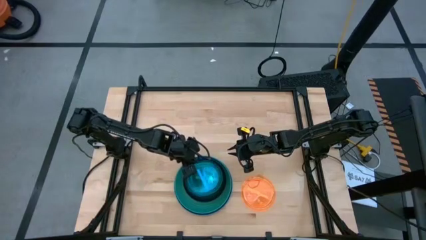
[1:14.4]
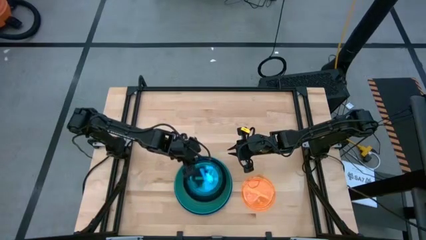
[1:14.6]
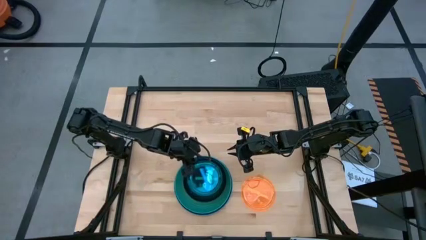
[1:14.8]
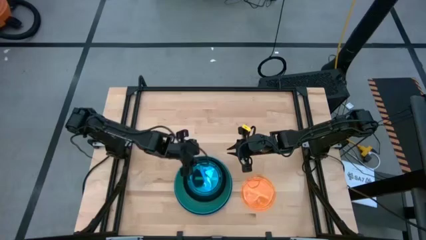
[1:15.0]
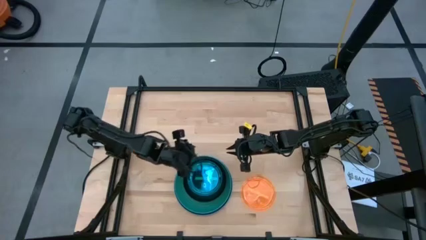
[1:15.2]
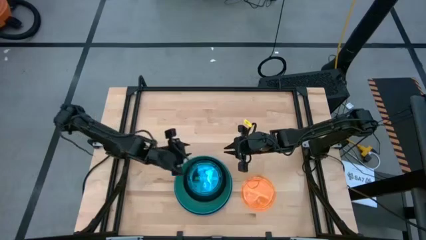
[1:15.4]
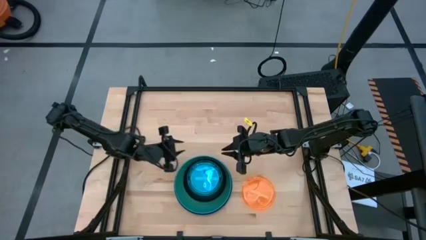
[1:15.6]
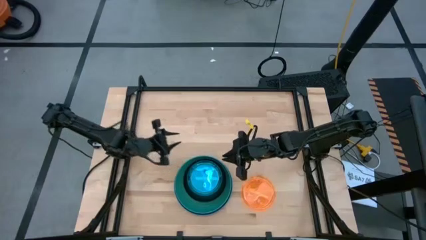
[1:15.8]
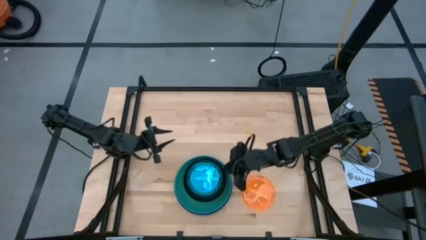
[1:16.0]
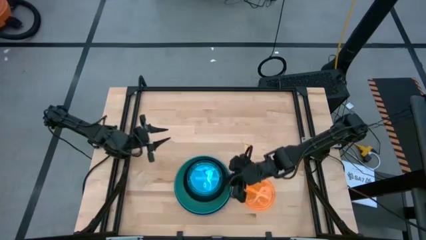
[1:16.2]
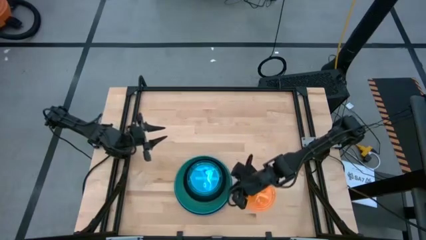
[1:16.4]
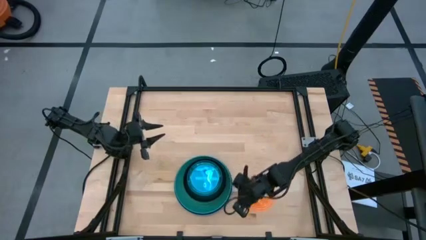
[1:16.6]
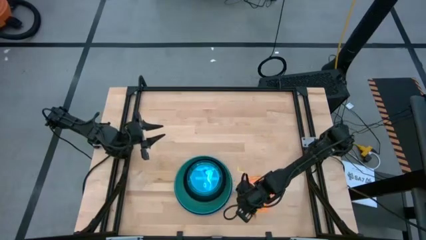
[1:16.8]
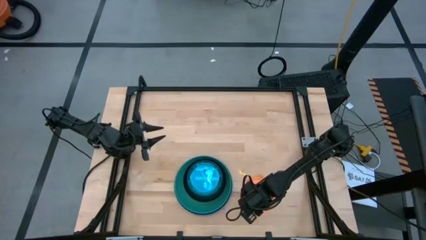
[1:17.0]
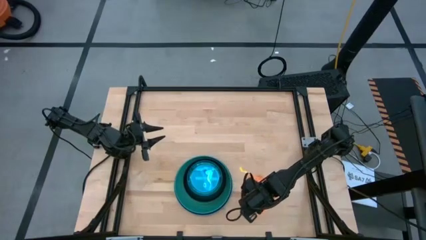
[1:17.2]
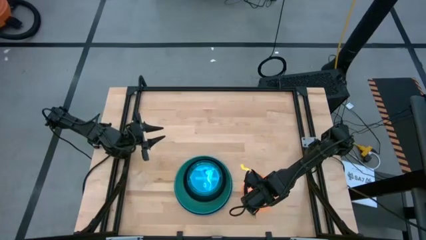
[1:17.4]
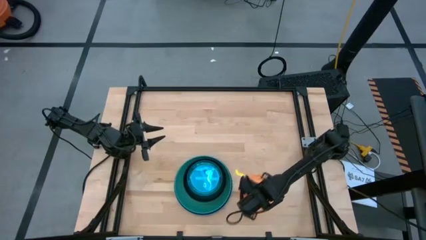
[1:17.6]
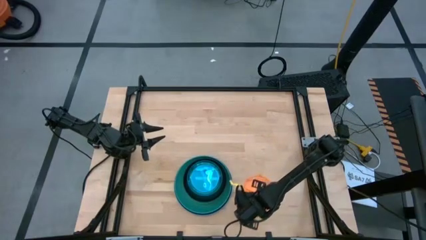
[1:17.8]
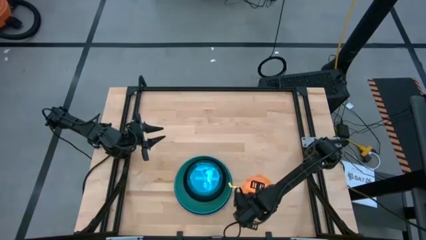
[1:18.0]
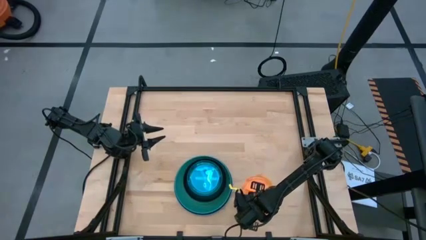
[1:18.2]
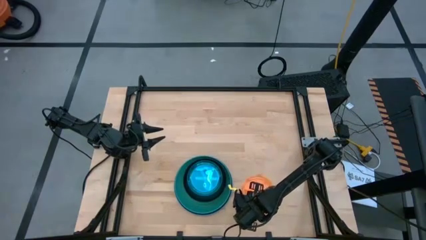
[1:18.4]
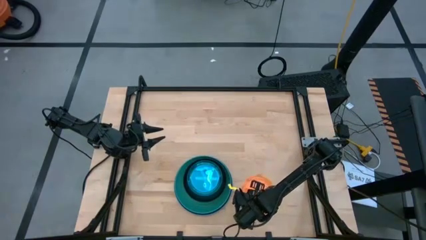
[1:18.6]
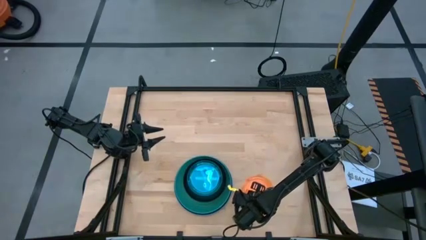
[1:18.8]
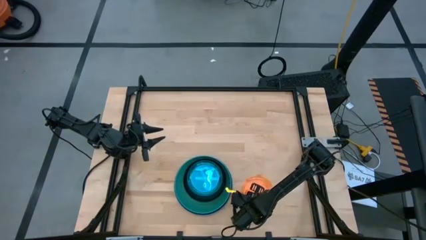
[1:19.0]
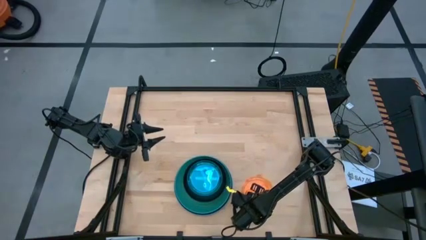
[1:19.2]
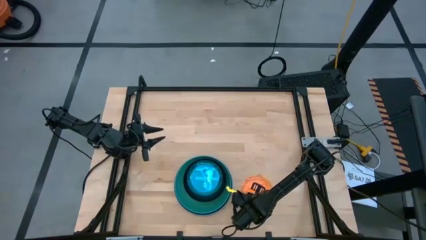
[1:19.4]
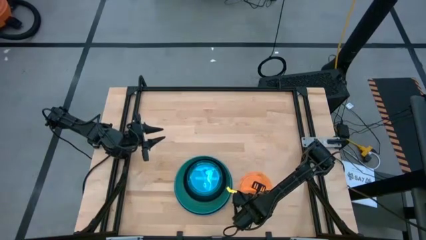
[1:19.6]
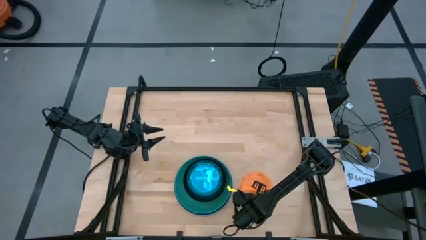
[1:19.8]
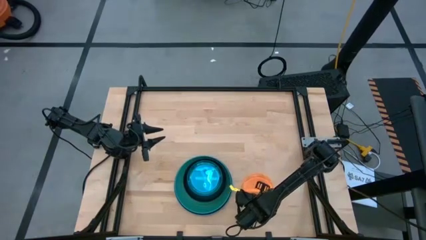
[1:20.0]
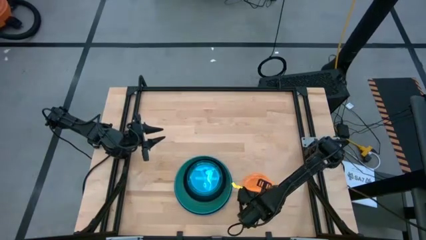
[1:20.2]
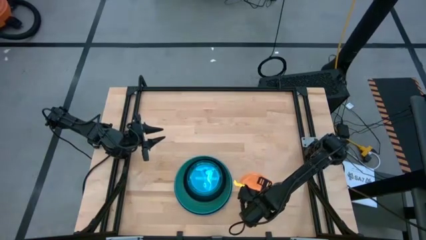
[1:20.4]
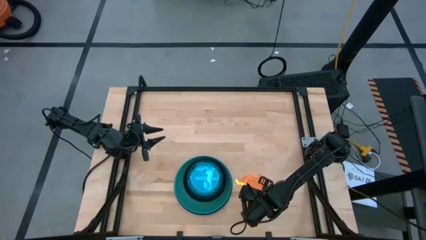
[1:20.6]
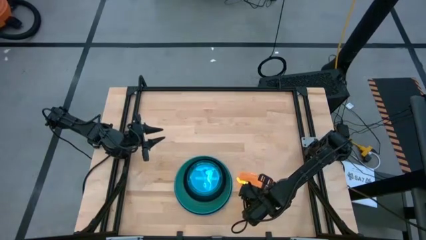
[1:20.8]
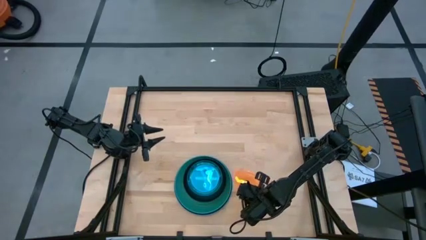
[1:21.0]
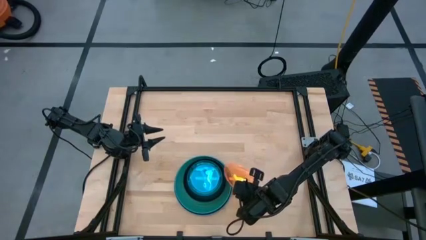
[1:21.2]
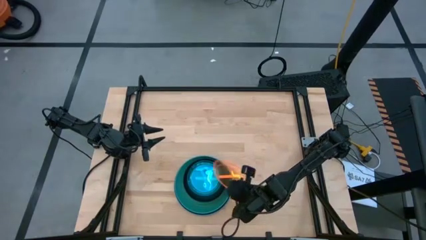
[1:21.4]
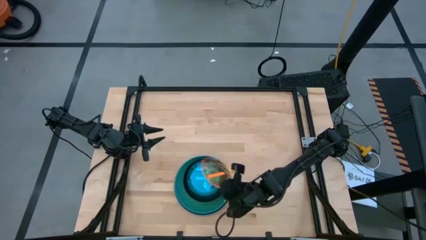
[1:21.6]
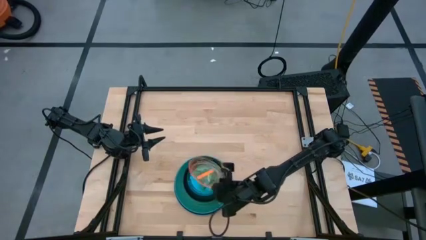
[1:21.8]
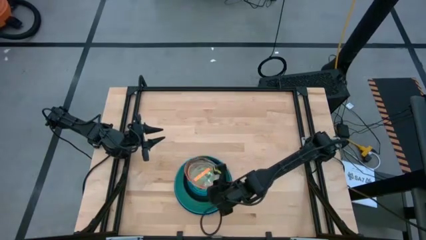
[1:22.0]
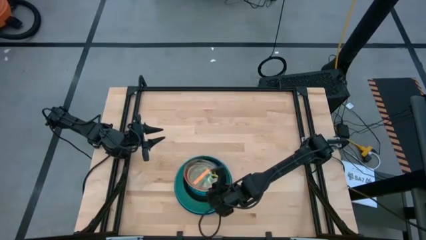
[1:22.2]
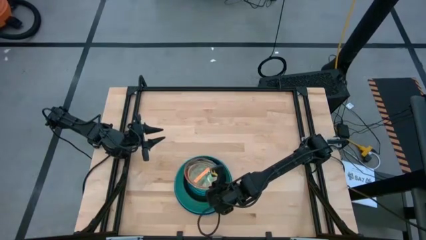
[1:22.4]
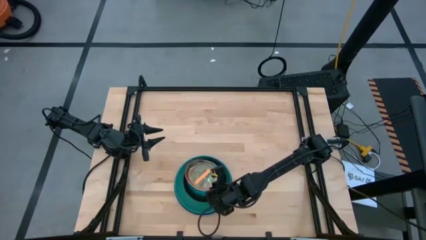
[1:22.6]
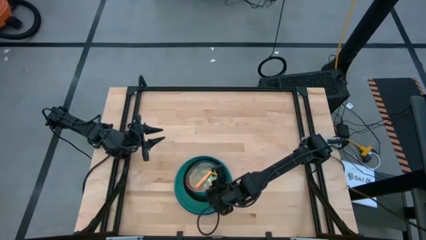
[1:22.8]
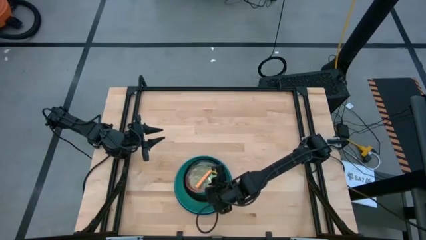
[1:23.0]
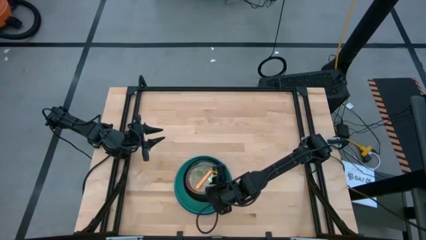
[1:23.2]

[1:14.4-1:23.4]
Task: Stack plastic plates
Stack the light orange plate on top of the light blue plate

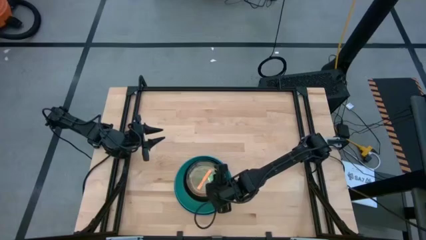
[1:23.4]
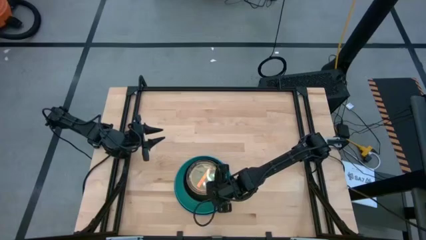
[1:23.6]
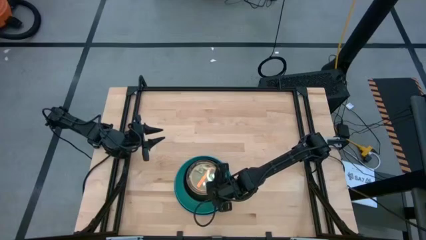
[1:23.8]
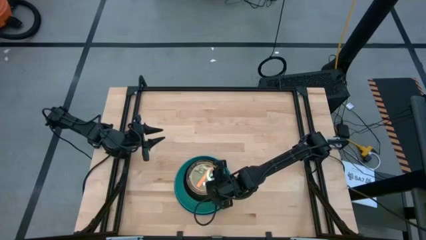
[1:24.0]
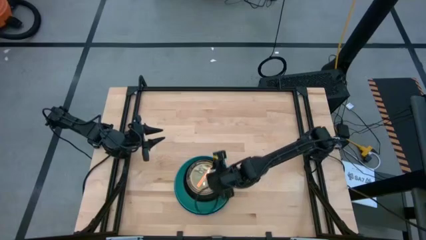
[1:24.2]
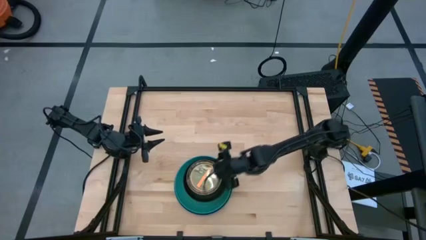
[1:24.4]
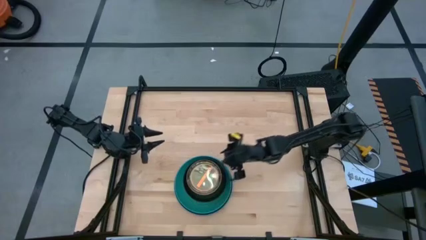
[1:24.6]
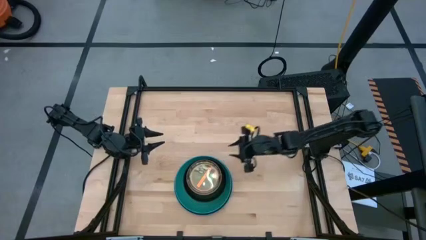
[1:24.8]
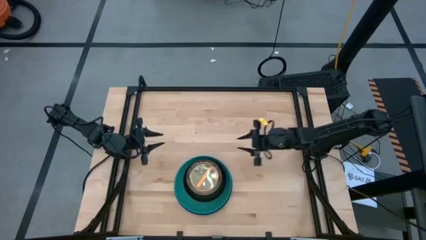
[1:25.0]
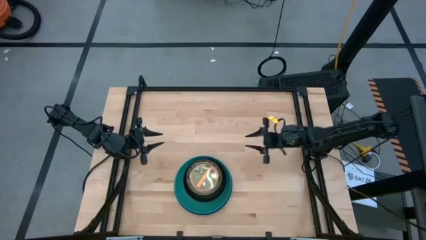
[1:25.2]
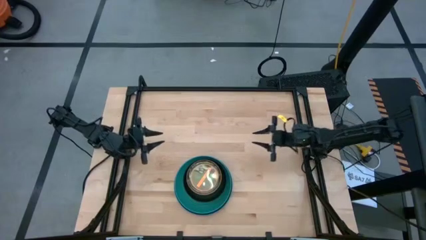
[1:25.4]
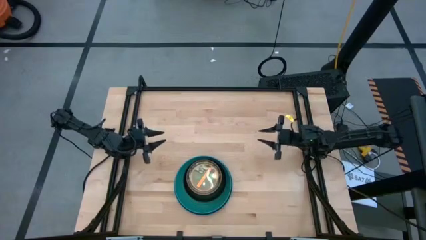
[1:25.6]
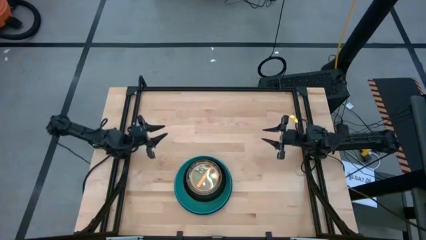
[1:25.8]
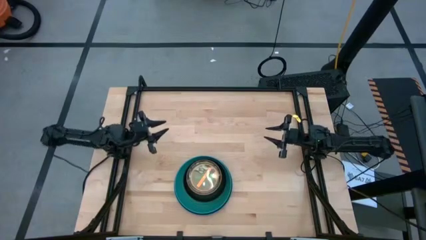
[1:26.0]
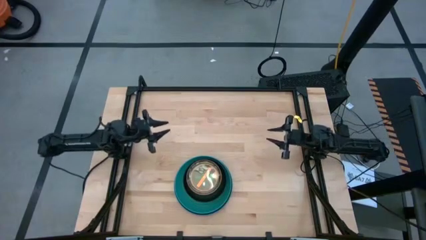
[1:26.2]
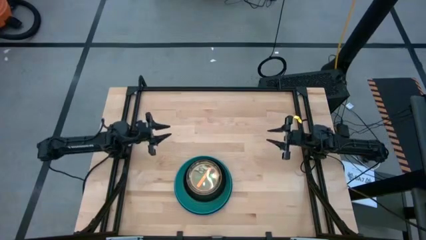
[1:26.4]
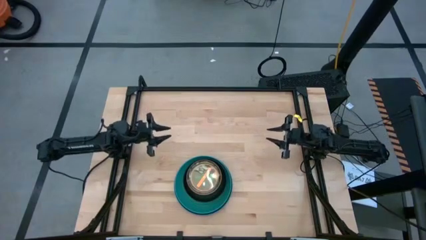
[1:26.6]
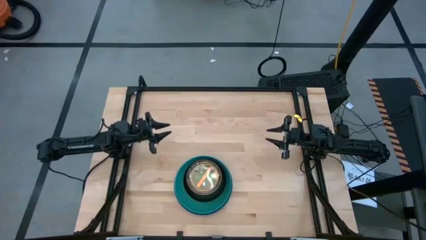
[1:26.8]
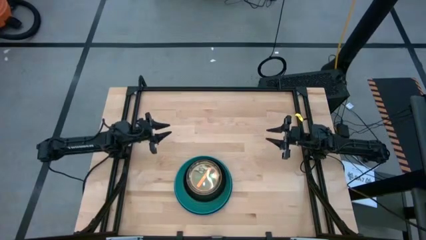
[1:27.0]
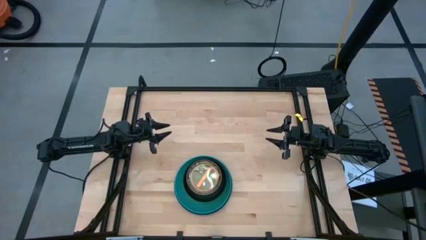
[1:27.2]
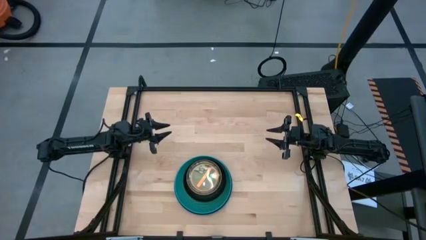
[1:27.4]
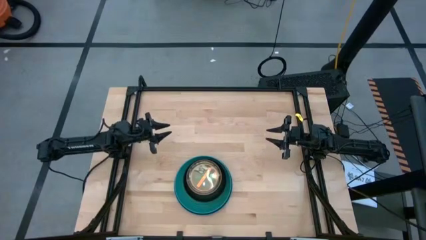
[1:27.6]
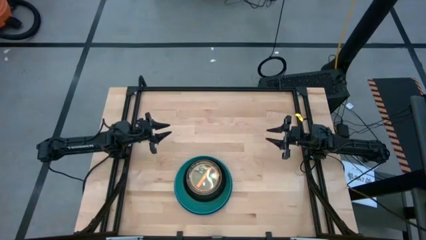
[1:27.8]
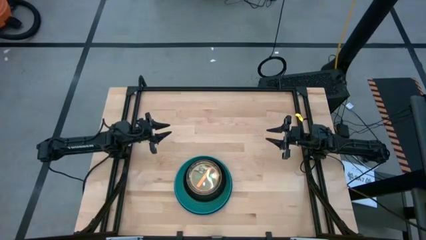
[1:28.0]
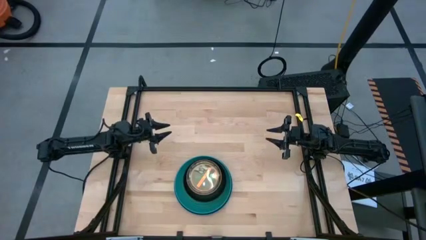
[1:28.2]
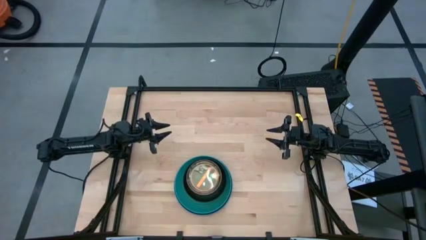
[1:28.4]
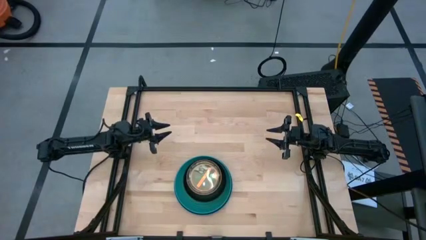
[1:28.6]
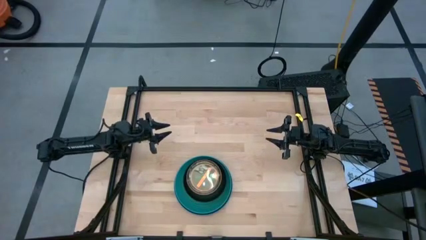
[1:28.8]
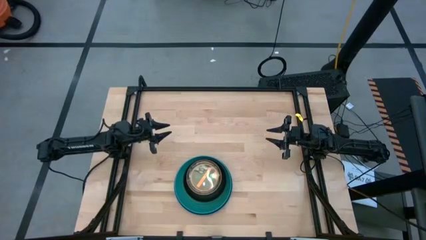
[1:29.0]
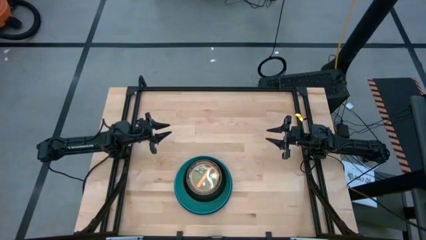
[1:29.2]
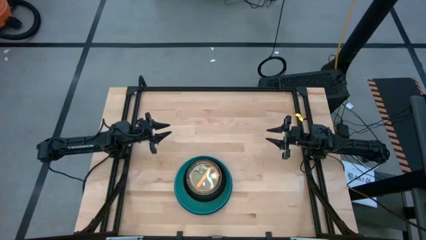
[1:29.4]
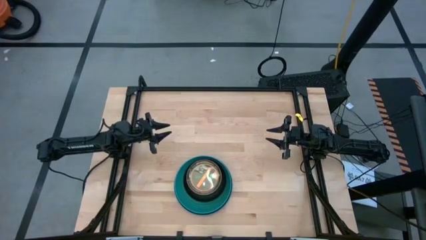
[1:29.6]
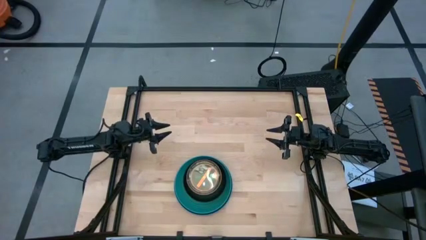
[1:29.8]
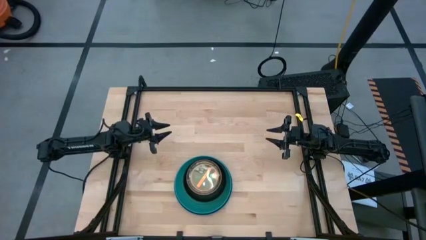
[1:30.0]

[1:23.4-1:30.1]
Return to Home Position
